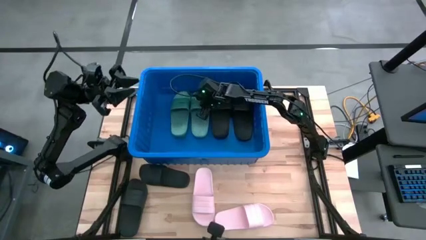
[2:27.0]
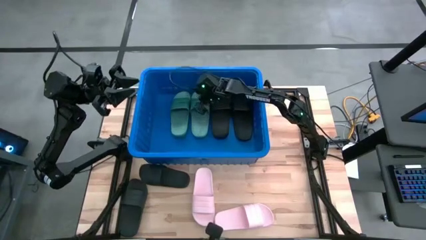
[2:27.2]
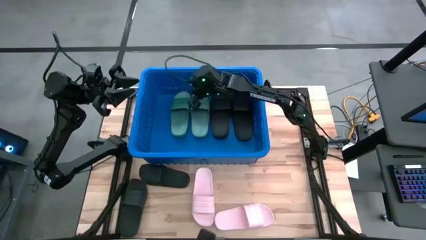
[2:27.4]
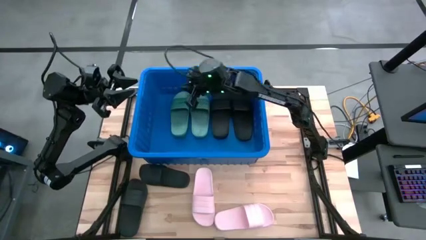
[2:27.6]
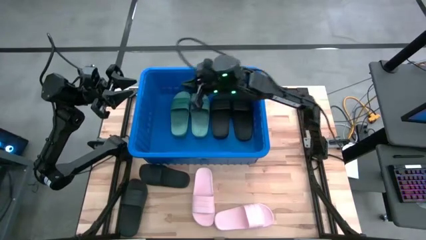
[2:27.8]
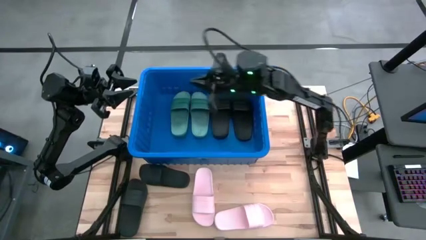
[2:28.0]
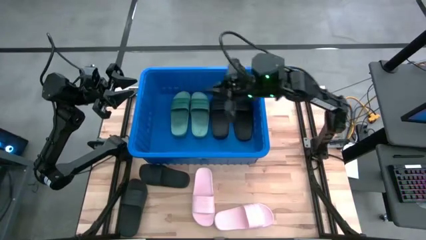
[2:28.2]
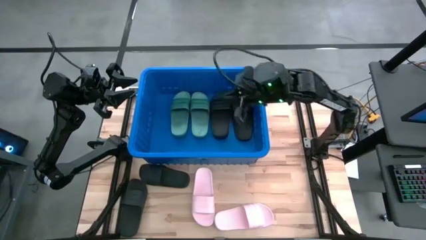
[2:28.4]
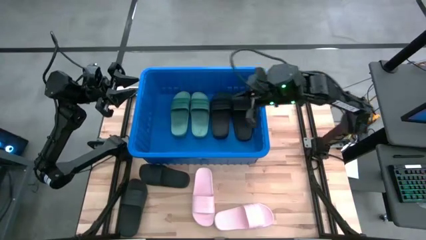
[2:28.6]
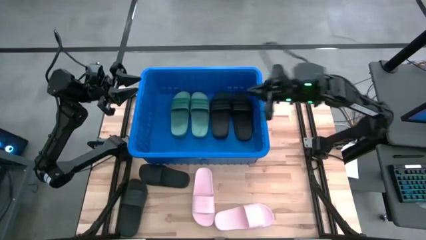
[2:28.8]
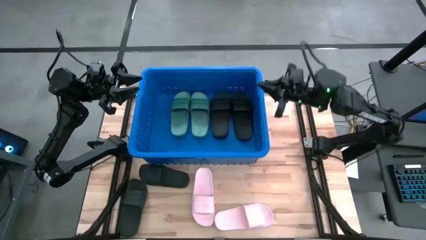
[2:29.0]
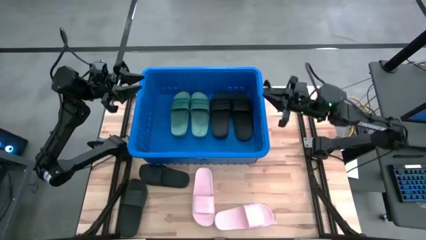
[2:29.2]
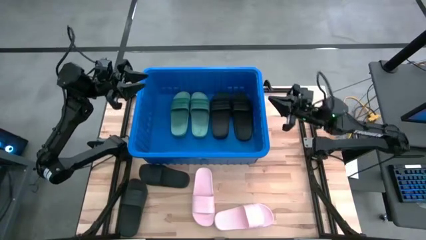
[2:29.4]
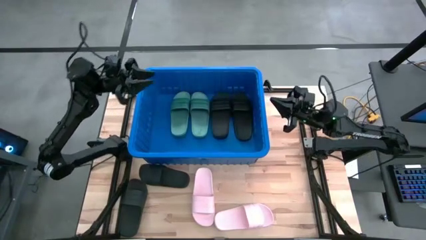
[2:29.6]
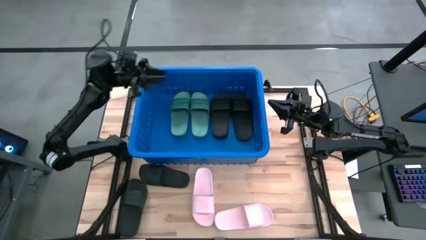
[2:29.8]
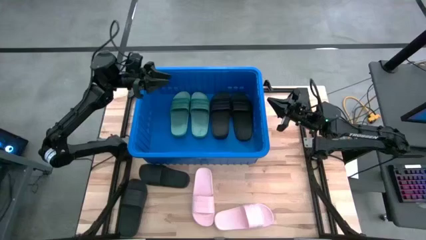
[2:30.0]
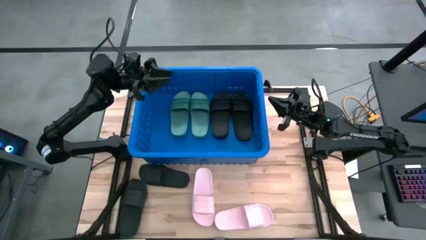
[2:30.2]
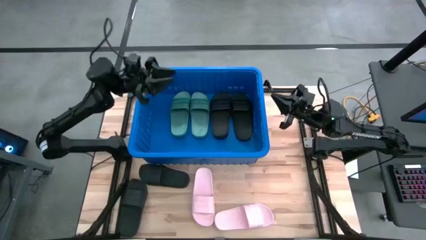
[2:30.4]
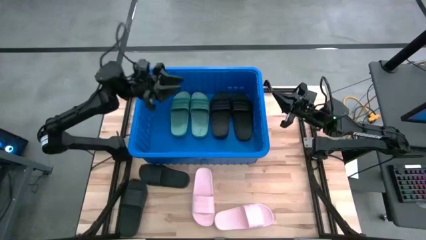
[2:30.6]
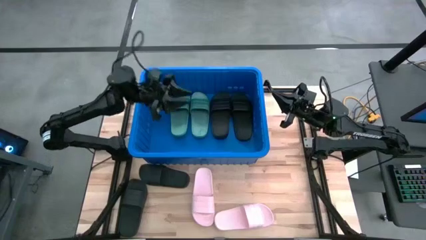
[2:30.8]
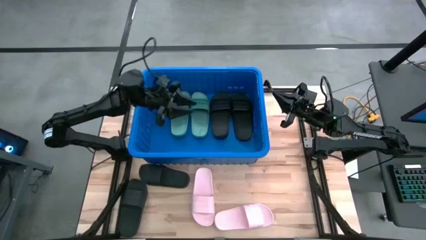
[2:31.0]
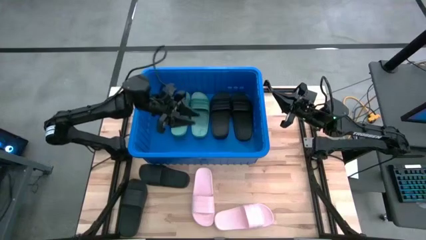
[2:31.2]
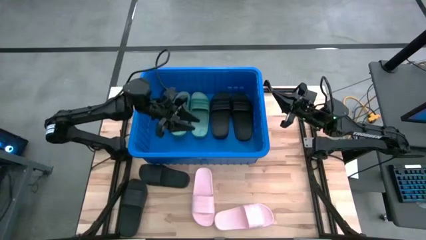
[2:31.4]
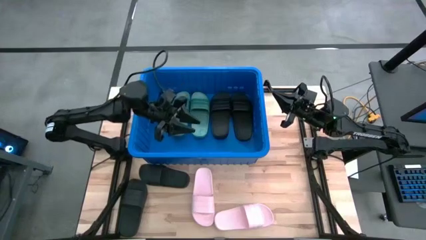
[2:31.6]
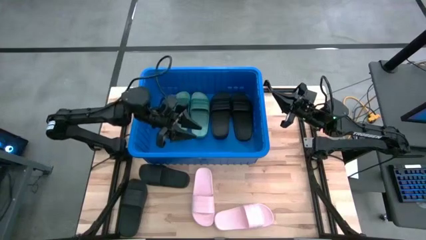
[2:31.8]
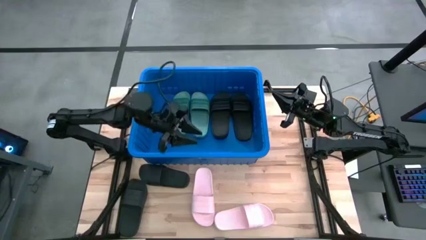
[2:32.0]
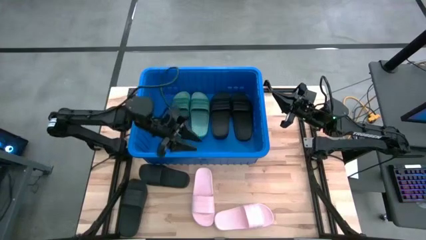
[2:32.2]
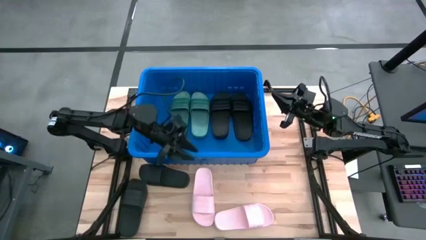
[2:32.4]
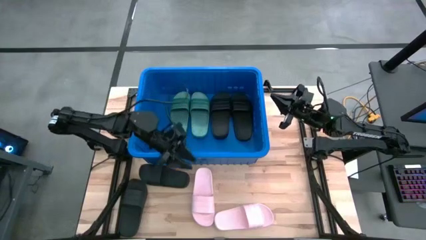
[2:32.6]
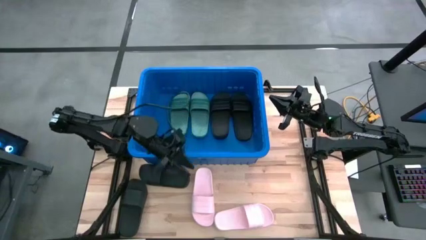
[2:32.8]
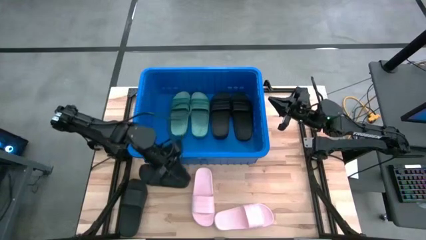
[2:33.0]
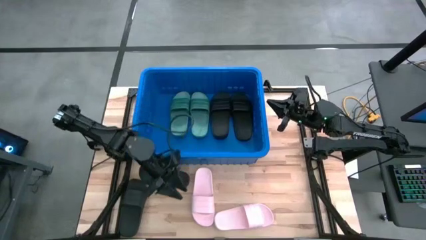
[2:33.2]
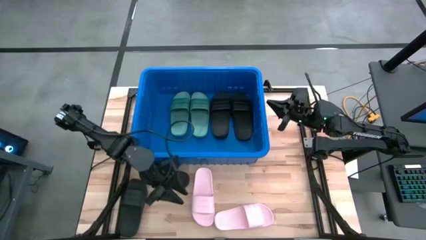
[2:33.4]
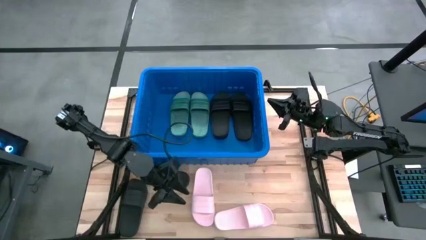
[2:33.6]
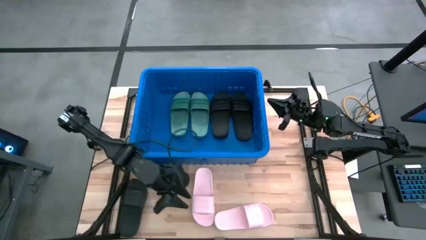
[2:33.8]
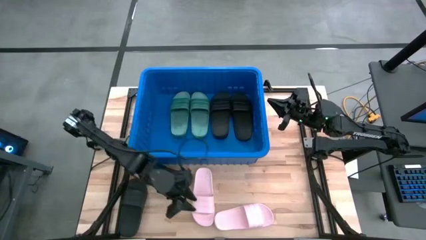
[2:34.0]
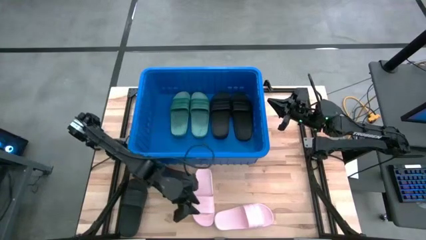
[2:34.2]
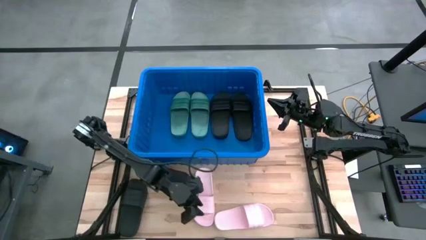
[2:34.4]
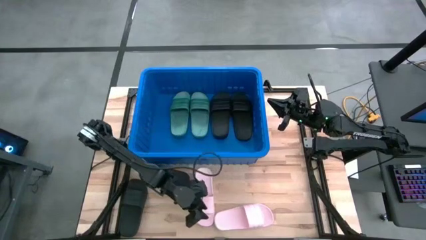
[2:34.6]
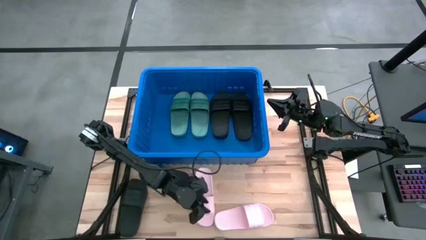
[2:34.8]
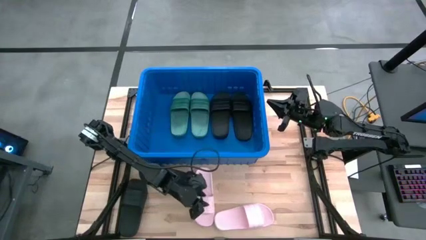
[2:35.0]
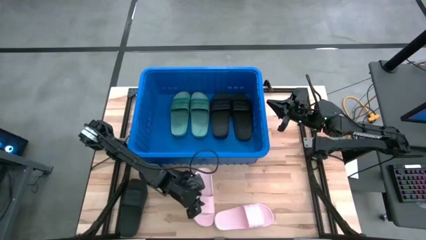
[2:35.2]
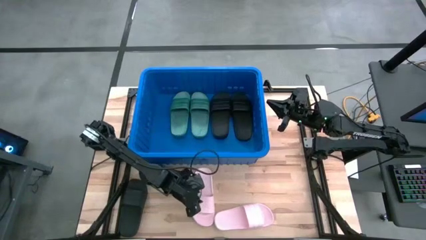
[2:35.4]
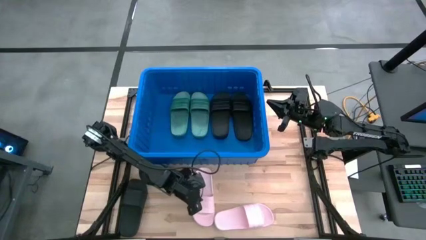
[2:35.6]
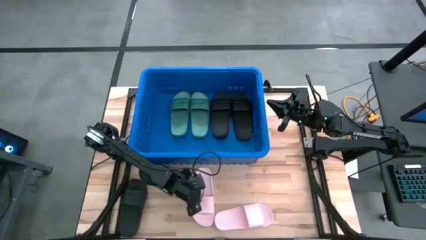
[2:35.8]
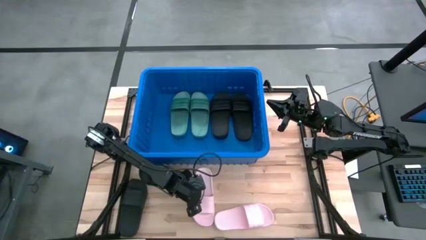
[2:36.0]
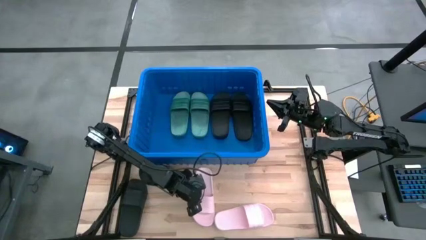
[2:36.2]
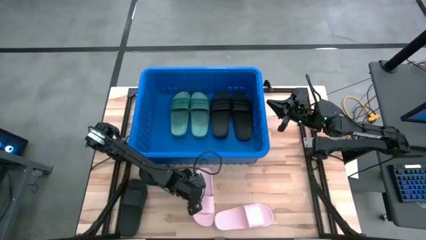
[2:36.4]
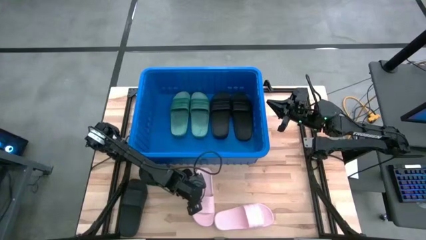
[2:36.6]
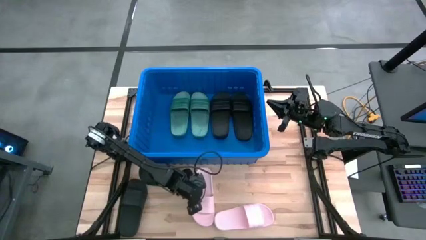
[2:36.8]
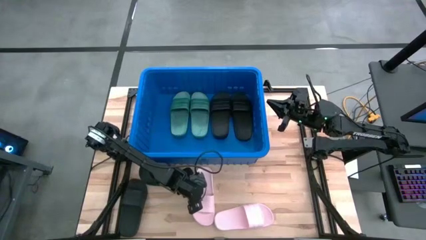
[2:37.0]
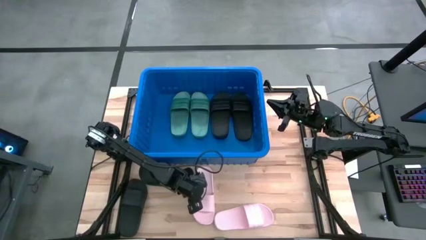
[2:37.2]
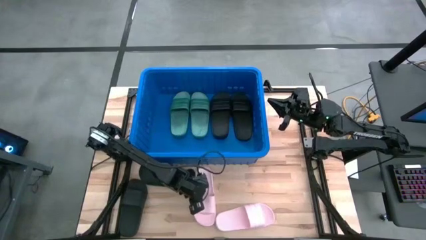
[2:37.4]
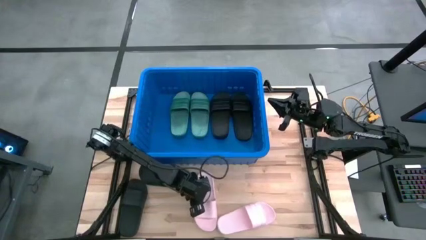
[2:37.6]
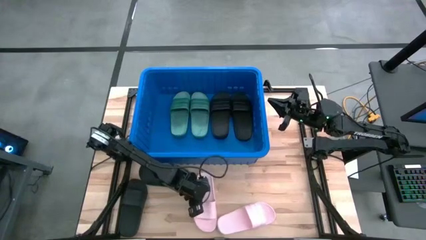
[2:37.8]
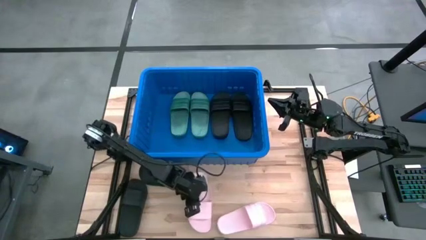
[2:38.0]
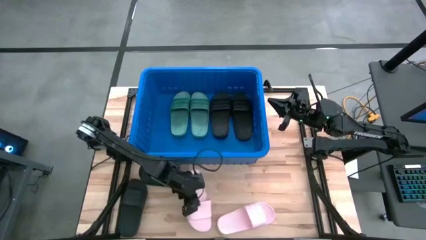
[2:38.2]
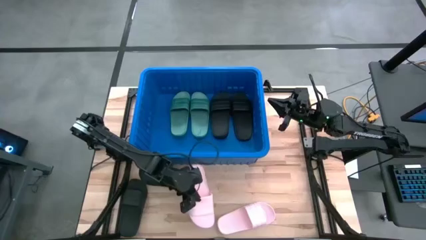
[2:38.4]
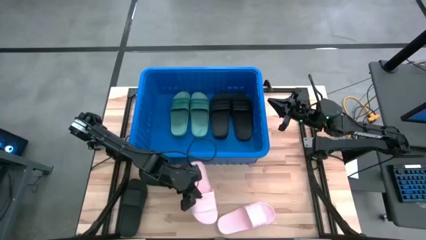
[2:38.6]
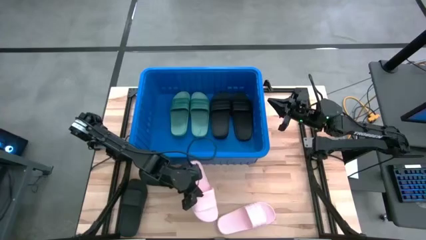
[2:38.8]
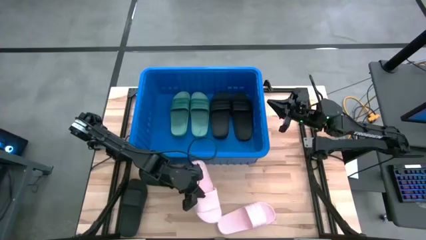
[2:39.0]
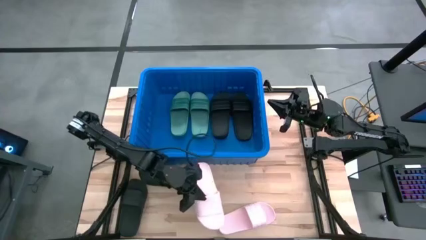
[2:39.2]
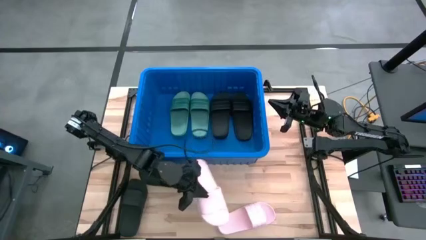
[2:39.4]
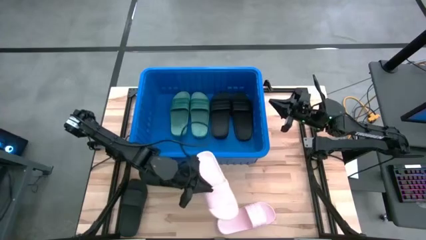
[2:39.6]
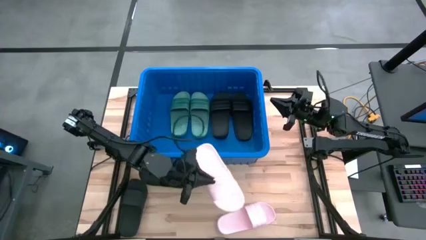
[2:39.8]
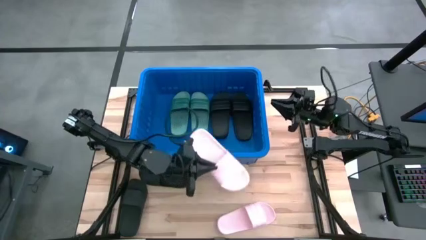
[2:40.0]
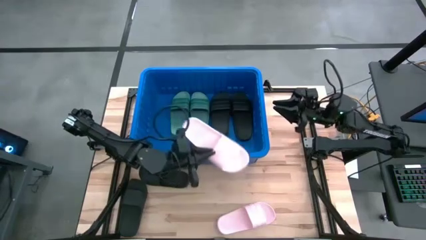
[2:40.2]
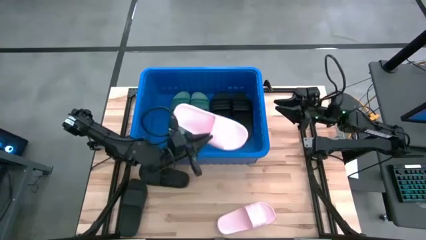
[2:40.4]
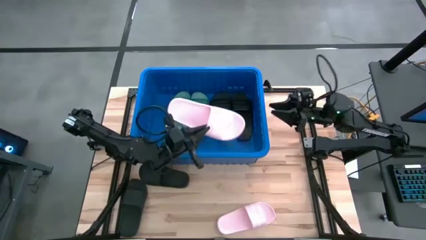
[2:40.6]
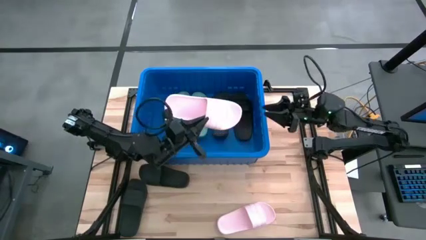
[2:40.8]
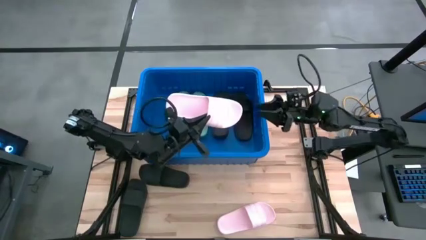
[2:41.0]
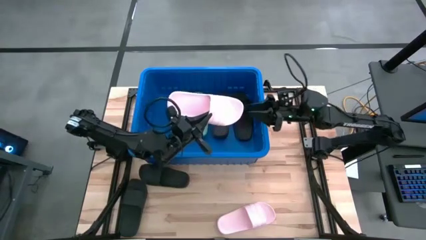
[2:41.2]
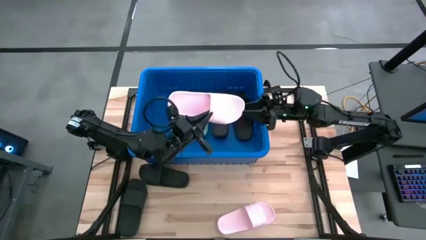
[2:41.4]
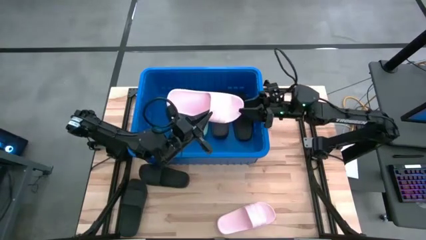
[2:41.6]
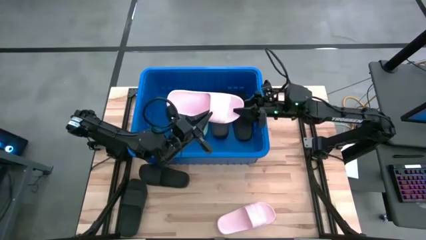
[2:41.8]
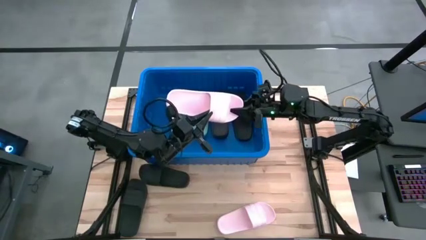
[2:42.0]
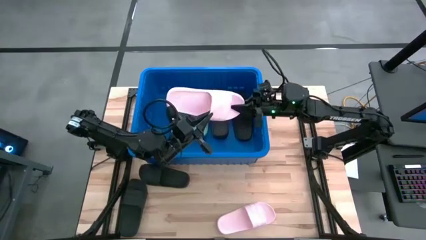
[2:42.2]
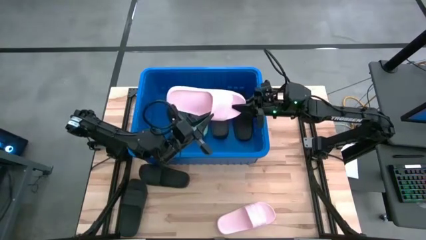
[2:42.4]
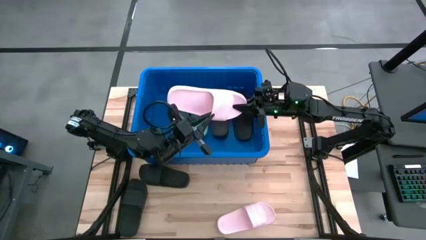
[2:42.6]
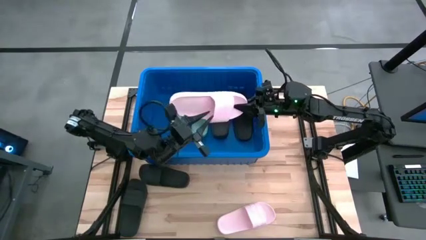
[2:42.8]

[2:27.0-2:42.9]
Task: Pick and place slides into bin
Put the left pink slide into the blue bin

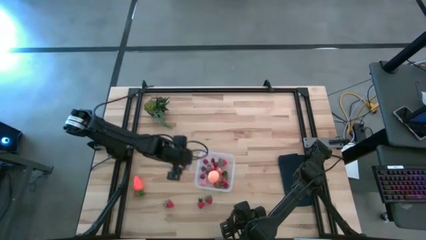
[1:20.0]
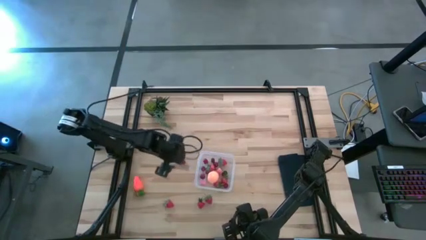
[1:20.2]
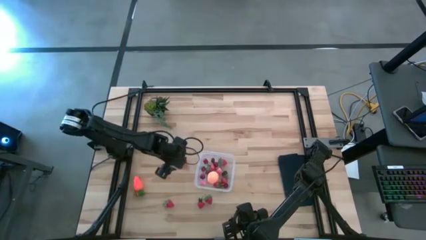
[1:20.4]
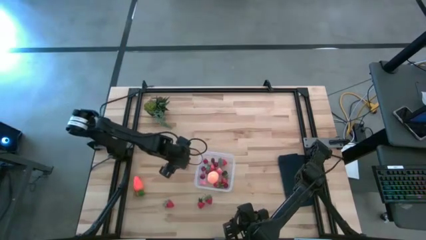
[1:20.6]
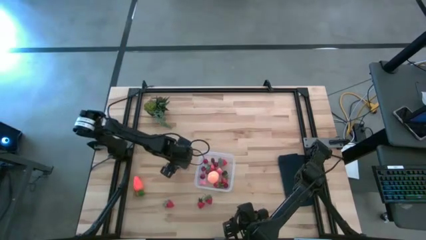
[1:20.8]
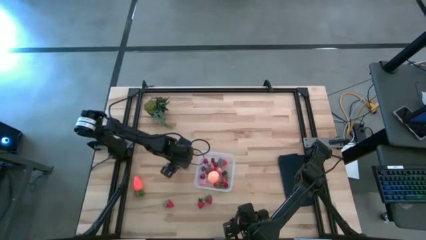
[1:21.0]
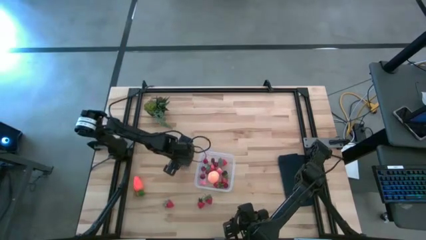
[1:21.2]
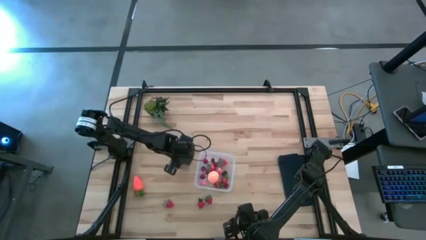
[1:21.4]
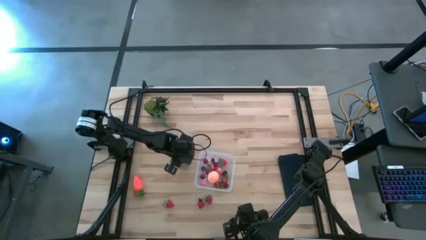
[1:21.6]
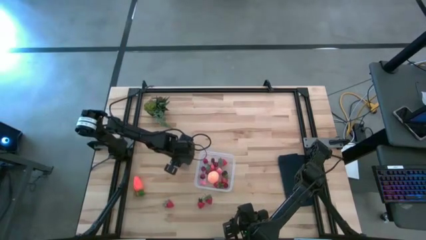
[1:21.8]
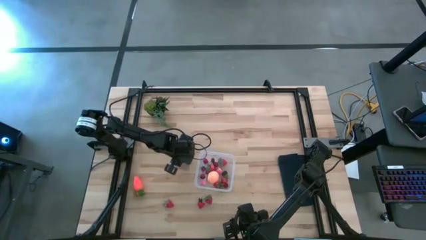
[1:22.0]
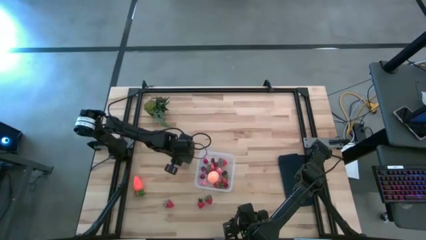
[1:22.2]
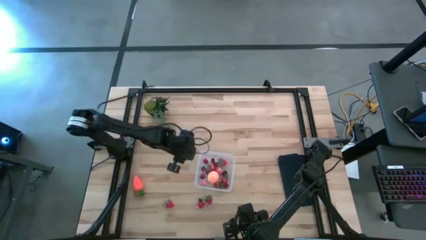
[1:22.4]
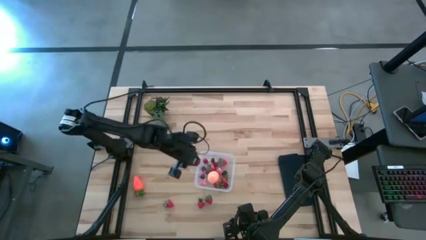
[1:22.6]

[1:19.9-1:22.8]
Task: Pick and placing Produce into tupperware
Put the cherry into the transparent container
